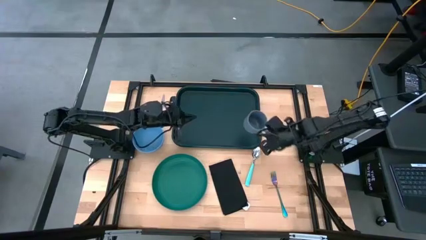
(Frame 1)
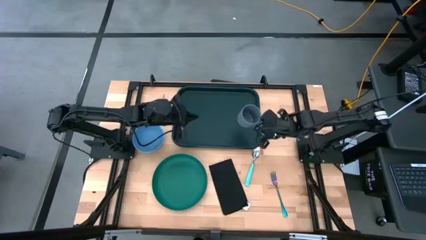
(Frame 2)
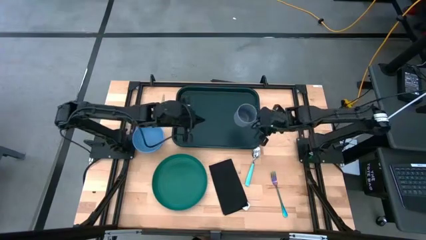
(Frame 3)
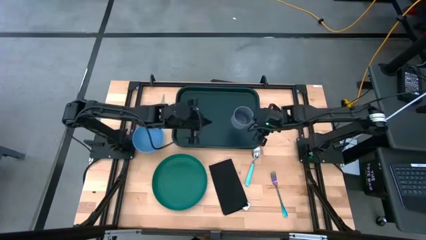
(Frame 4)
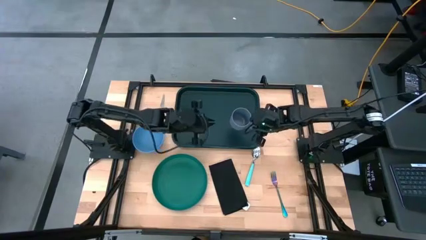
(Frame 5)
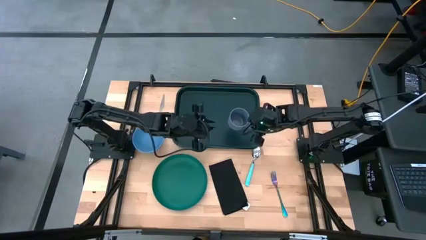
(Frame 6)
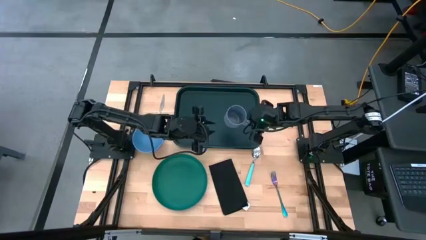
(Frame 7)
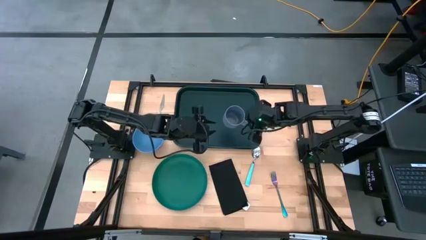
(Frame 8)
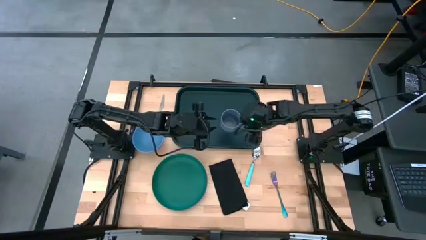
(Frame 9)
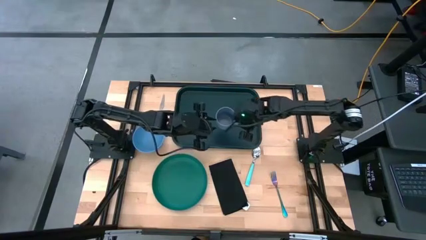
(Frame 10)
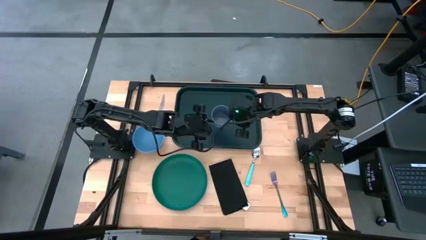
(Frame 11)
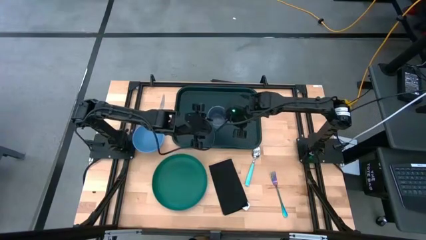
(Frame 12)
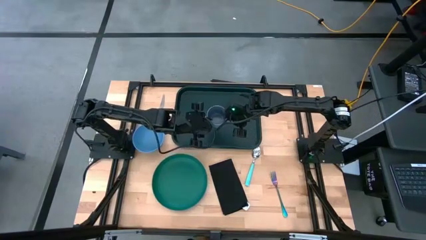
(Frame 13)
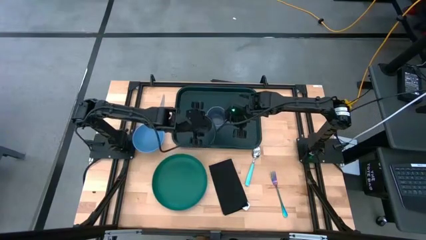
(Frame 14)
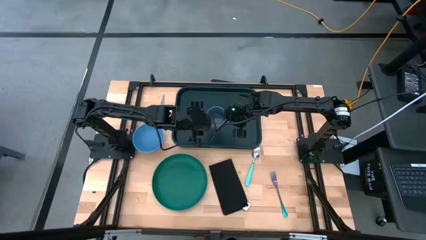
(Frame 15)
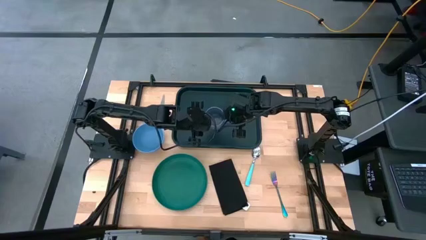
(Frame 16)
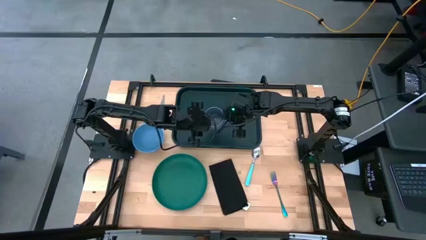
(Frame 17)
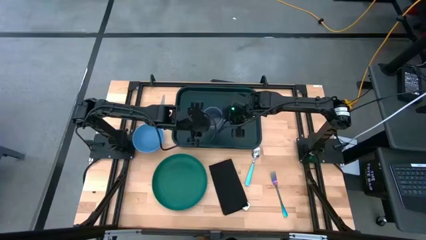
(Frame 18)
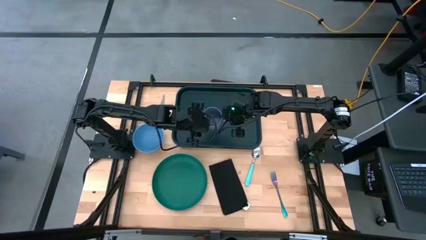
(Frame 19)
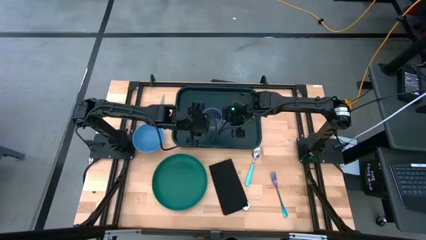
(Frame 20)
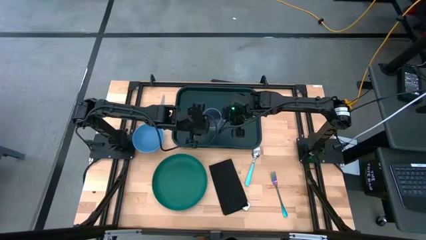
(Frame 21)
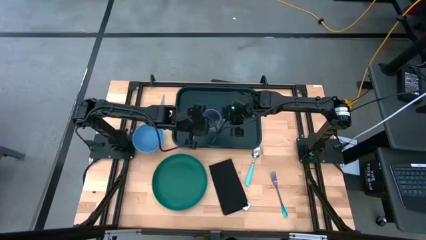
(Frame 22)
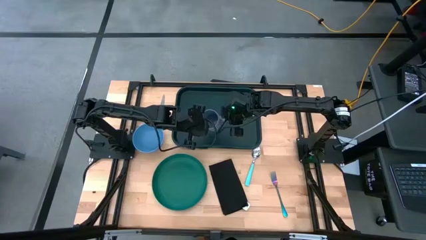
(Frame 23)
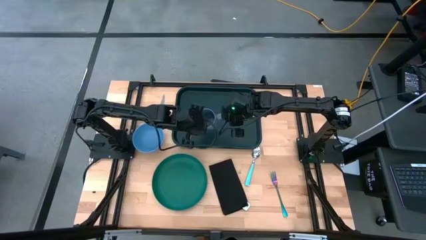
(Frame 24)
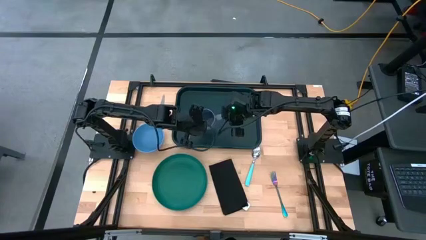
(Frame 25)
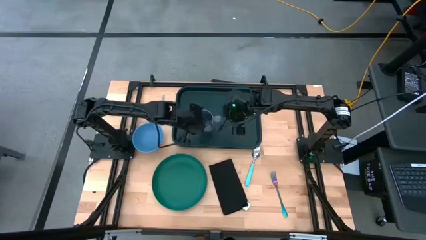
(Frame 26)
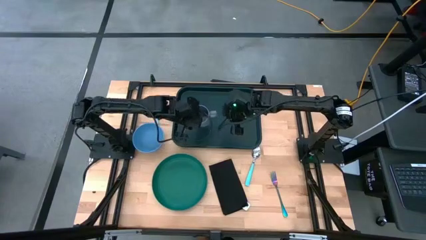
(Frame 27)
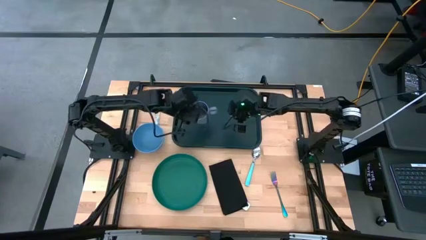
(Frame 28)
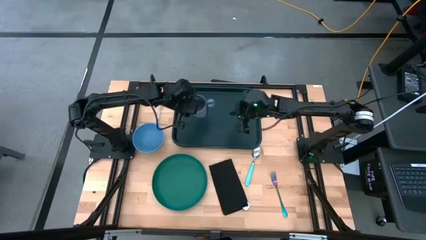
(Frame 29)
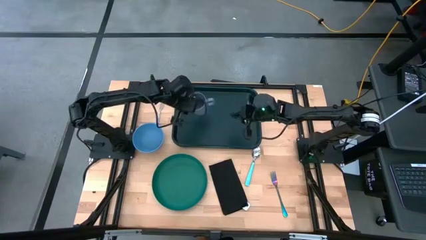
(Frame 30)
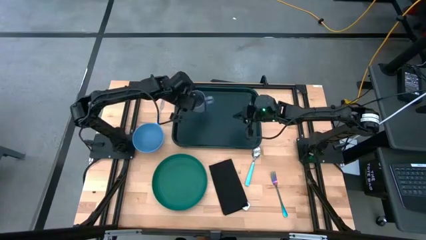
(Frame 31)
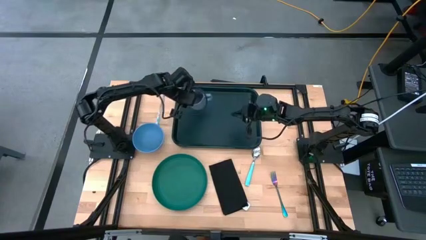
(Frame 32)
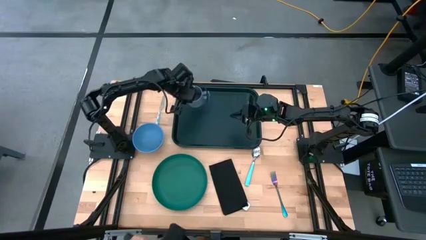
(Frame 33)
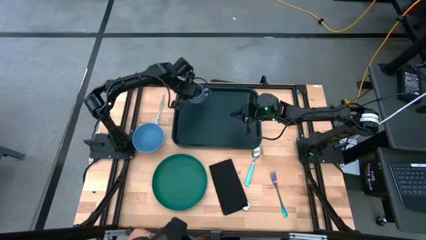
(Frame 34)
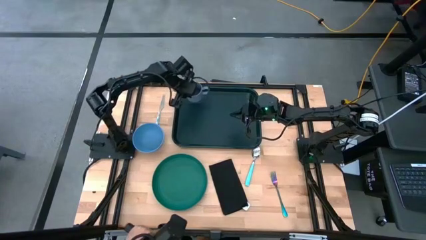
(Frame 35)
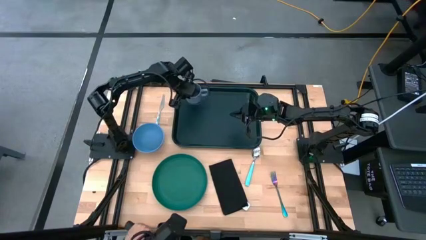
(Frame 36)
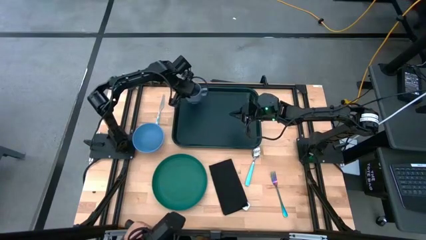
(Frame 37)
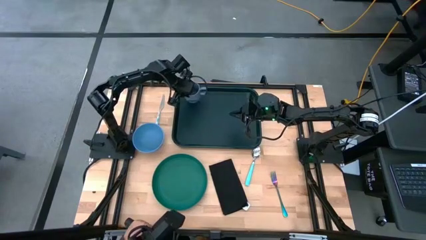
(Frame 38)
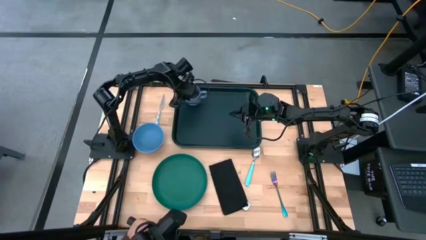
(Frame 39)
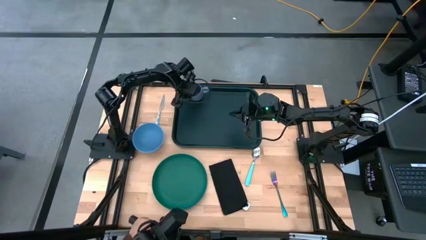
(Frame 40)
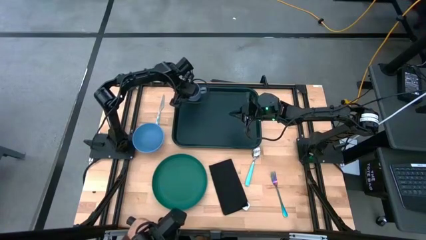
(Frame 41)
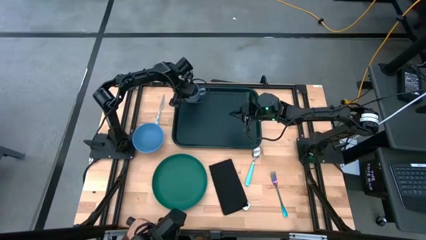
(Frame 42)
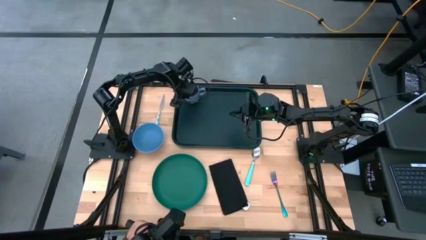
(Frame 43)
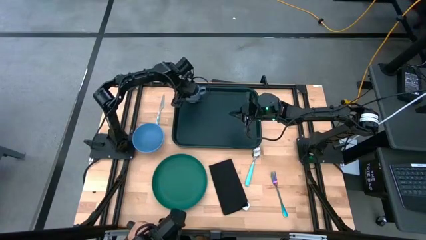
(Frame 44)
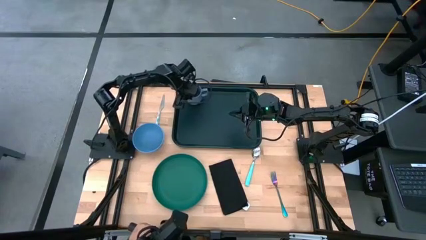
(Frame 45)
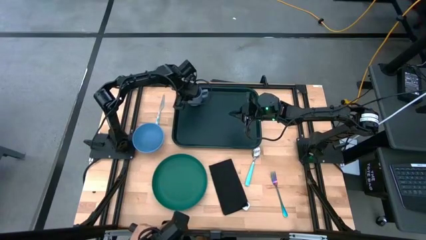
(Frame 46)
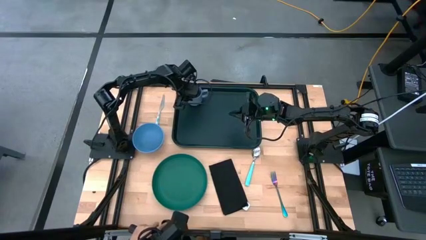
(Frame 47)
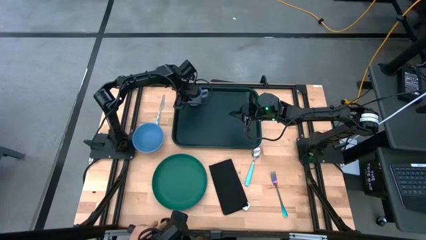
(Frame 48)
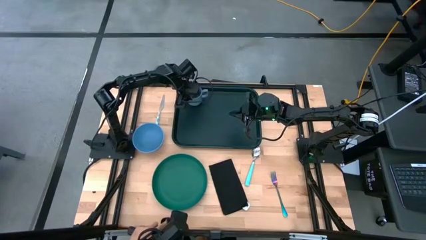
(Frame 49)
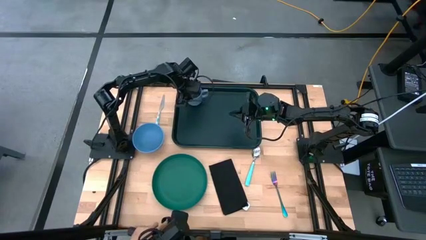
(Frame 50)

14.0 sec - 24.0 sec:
Task: Set up tray
Put the gray cup on the black tray
